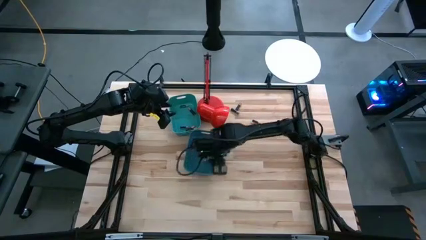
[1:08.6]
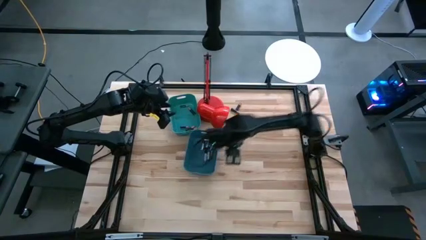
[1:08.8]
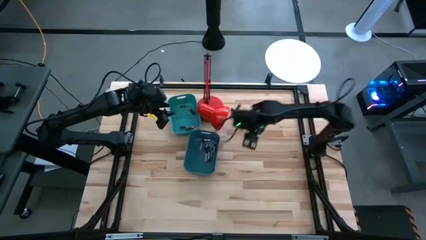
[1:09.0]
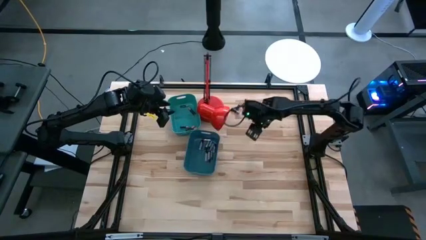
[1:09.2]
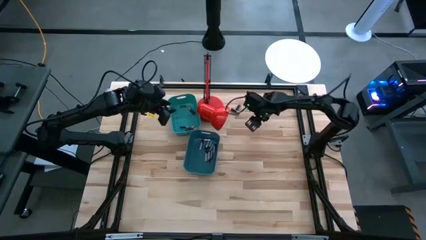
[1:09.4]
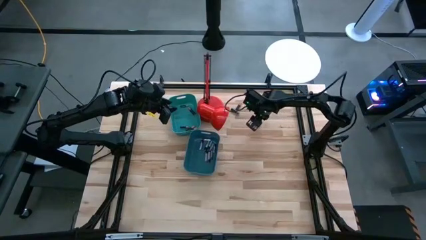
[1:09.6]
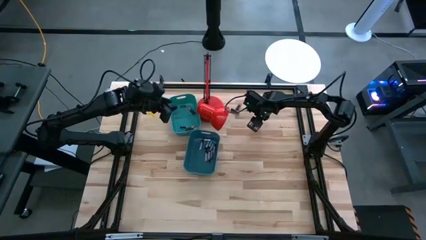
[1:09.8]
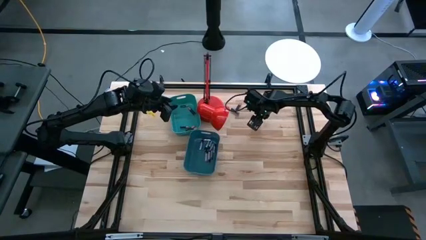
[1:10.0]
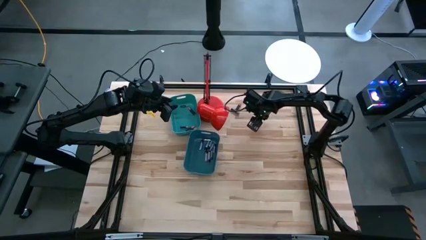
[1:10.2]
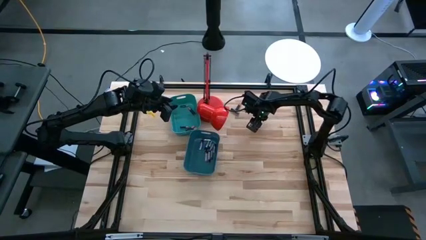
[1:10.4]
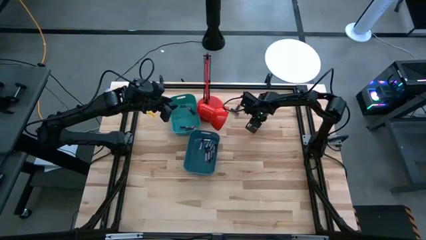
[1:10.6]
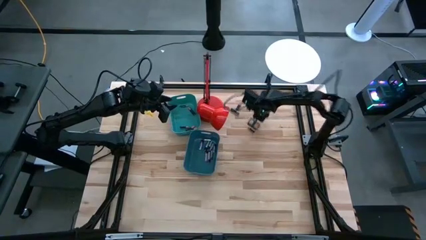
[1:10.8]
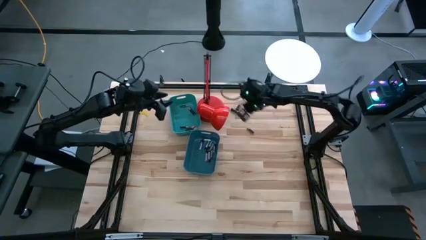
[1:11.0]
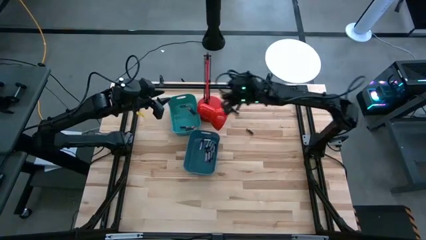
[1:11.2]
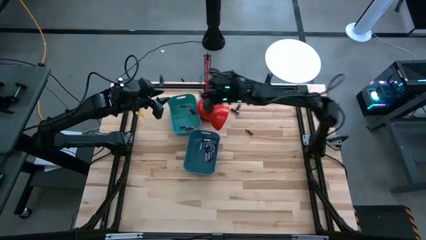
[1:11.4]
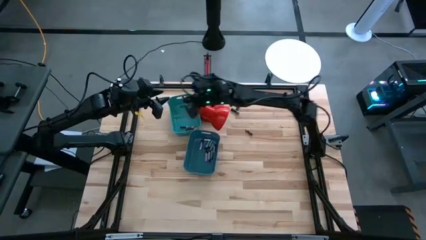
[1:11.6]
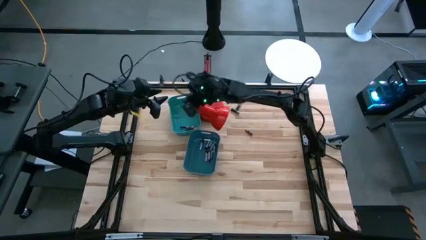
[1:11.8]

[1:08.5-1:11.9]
Task: Sort batteries
Put the brown battery into the green bin

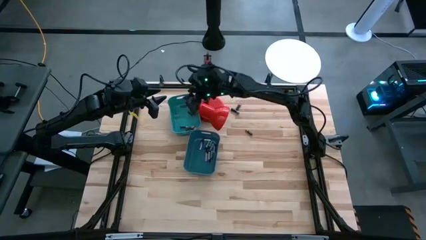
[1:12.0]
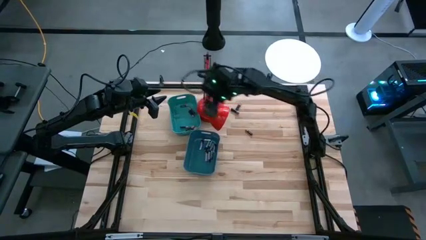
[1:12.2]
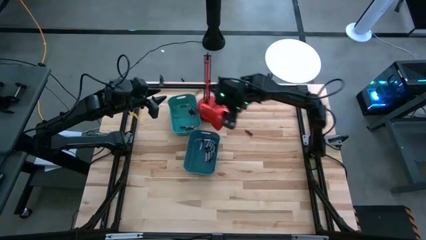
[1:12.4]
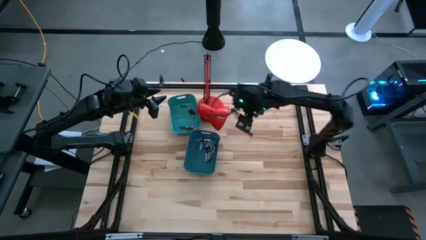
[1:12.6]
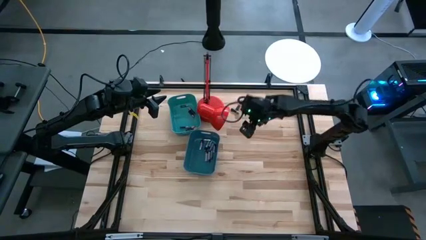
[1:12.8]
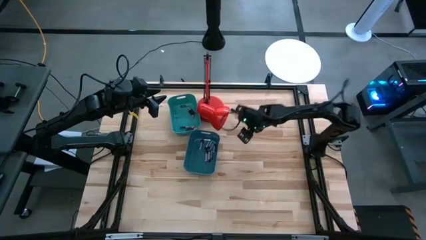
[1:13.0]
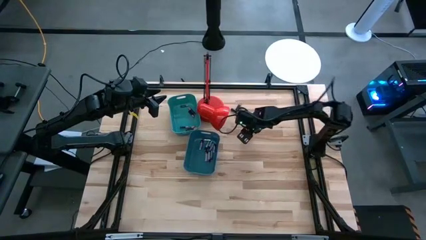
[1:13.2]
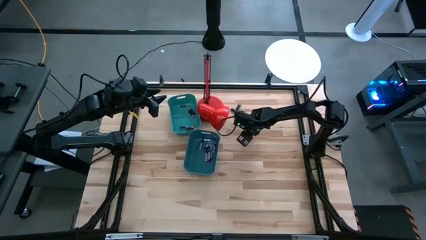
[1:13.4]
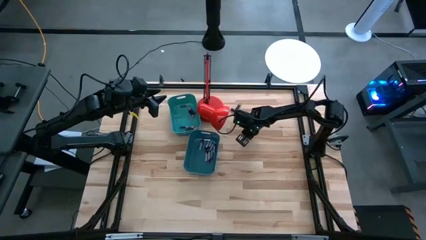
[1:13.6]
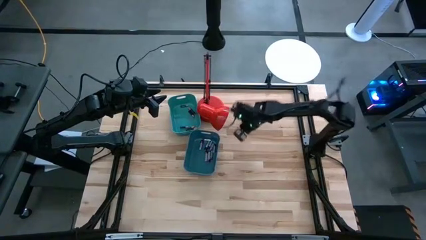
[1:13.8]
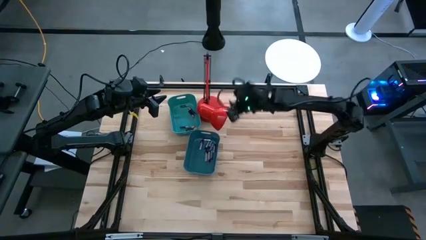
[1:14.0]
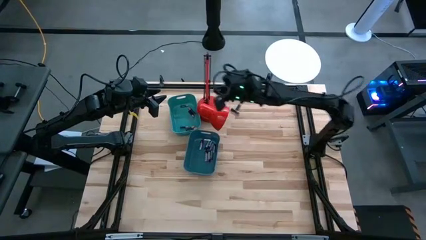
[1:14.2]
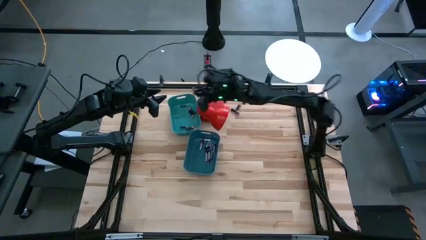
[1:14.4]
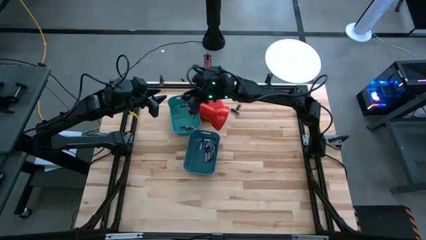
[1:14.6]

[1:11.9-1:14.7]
Put the brown battery into the green bin

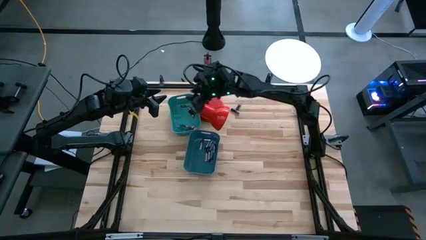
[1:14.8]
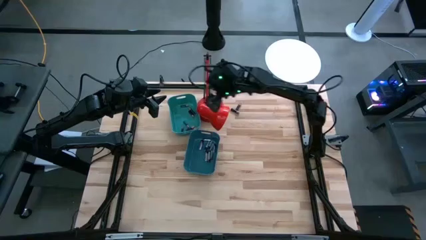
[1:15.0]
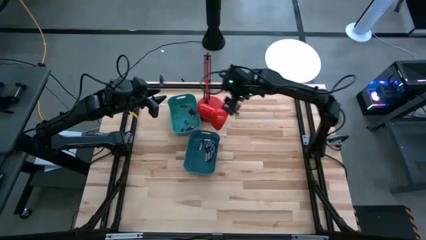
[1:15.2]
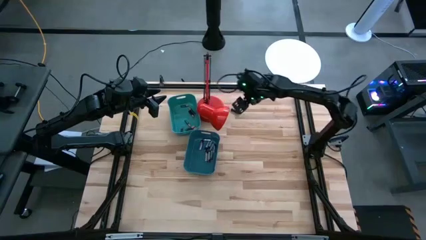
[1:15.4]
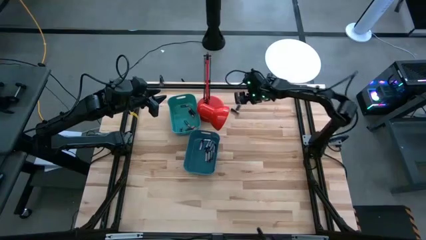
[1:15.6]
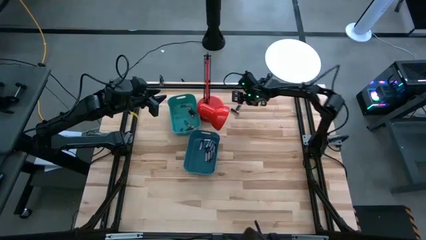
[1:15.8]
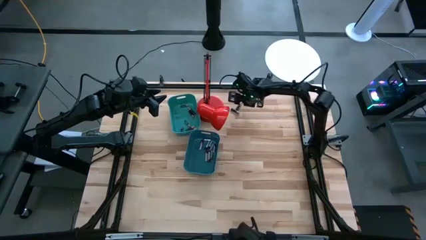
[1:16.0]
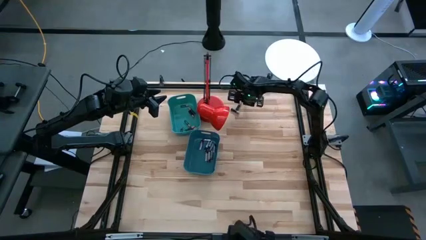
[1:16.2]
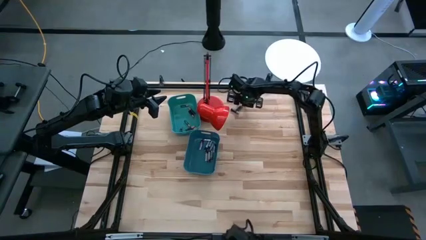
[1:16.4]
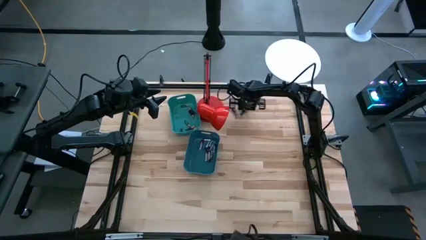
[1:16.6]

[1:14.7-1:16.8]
Put the brown battery into the green bin

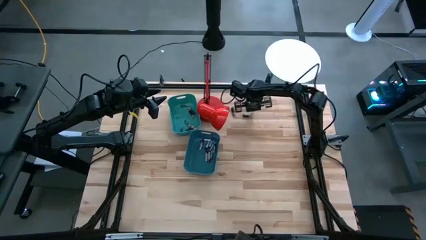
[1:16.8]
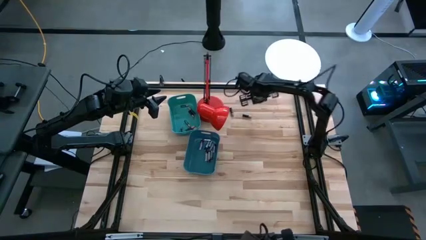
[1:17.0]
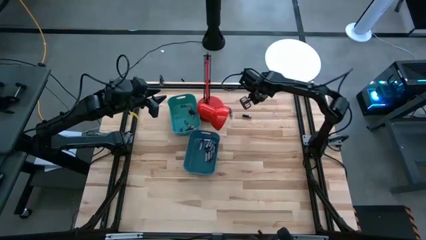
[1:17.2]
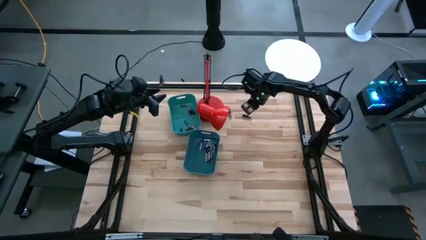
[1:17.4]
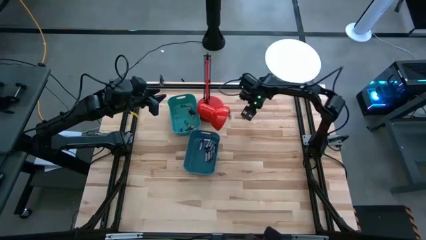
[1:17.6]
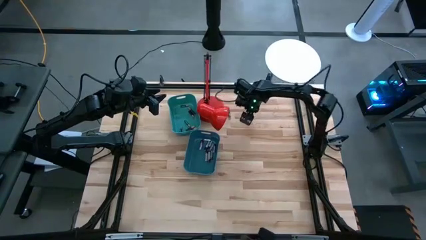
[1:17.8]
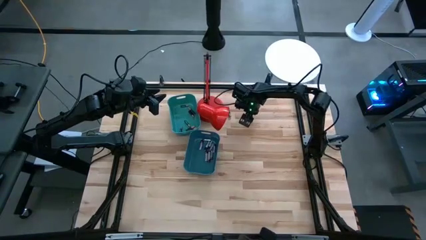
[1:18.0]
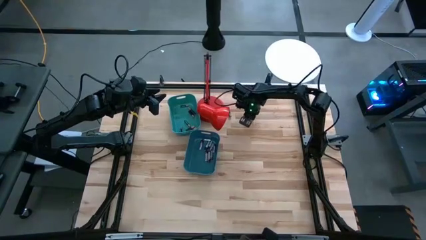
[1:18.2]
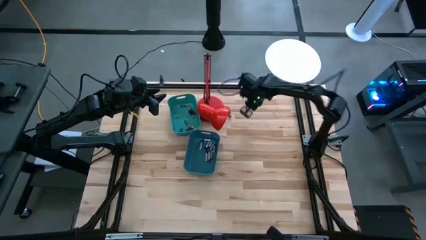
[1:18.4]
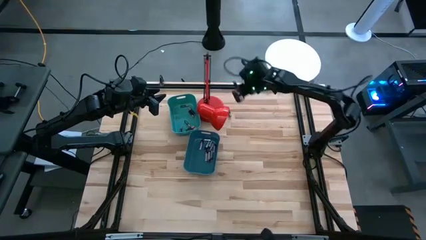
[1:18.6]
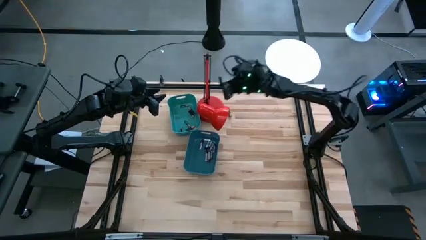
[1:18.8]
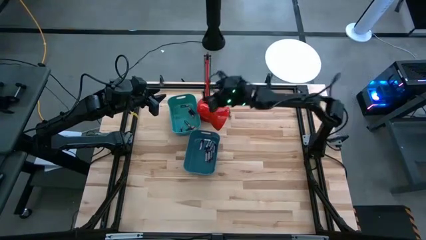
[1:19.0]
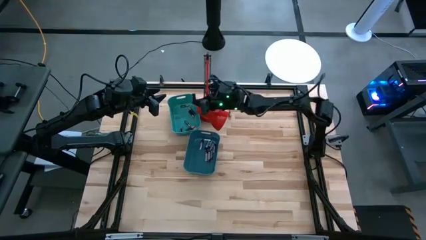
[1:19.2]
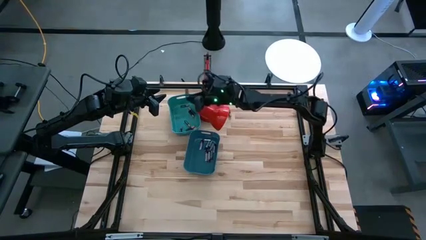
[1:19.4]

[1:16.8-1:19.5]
Put the brown battery into the green bin

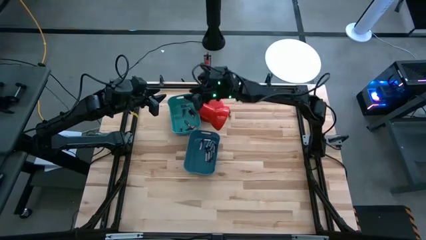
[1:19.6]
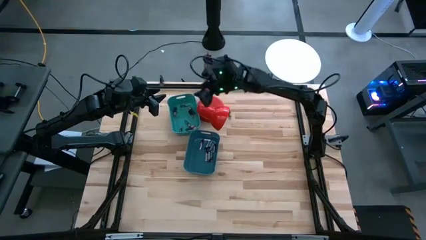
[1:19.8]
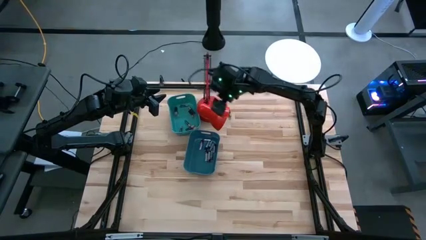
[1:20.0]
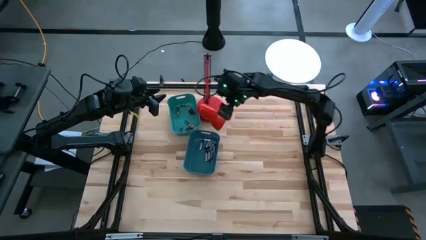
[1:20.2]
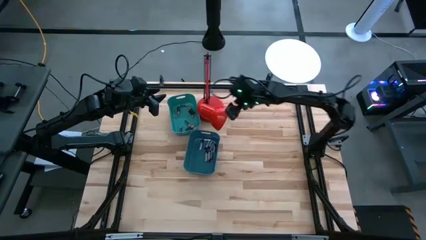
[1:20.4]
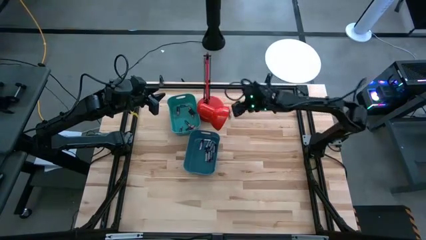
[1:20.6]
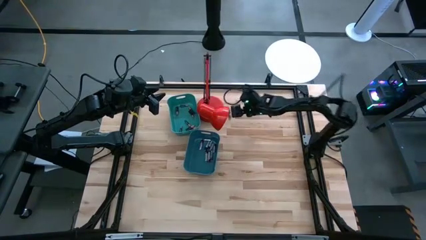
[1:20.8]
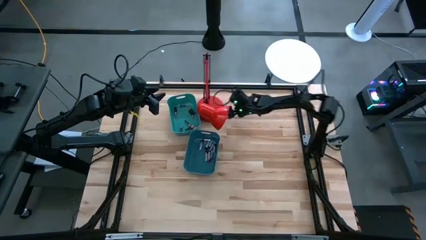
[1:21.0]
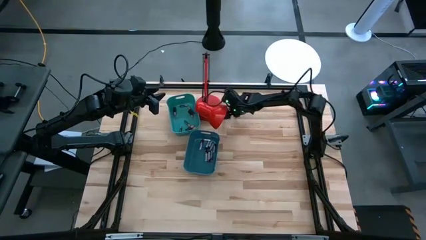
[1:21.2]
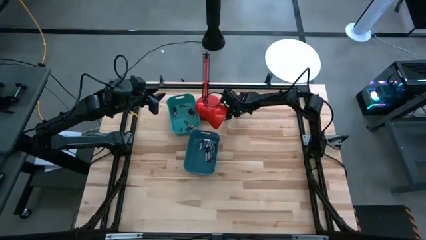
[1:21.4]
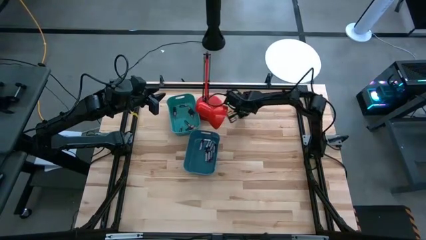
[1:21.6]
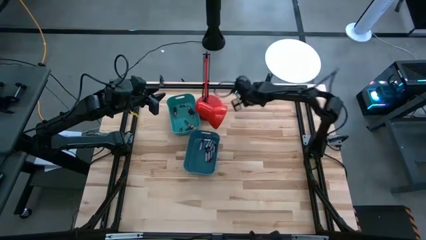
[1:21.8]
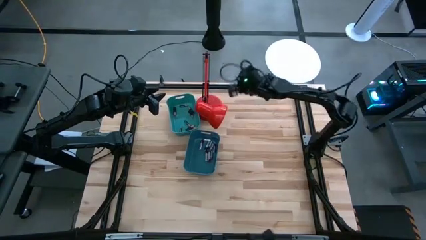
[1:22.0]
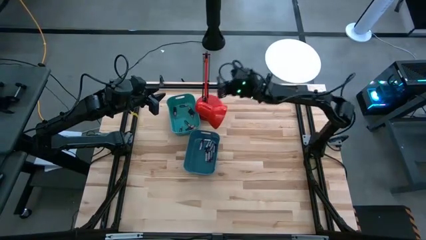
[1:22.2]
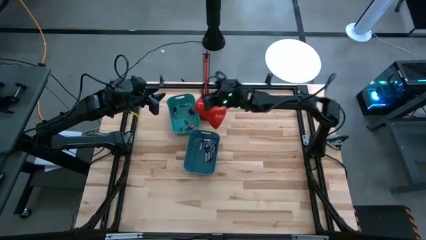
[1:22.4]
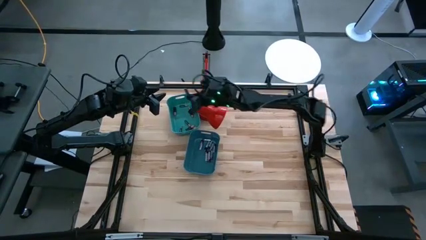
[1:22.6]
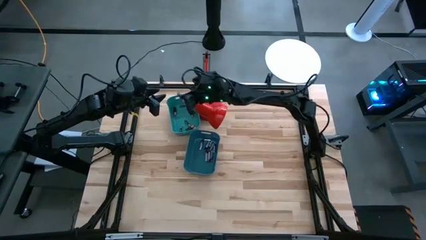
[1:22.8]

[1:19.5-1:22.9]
Put the brown battery into the green bin

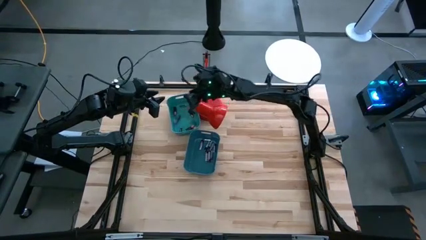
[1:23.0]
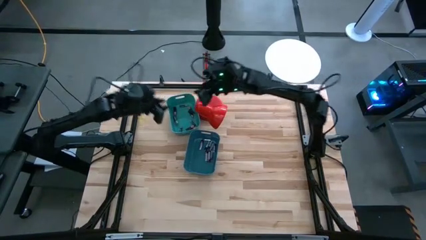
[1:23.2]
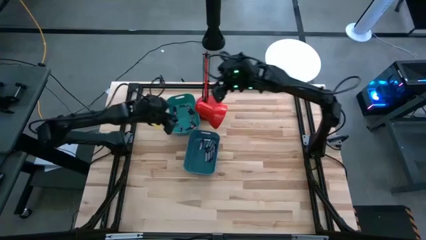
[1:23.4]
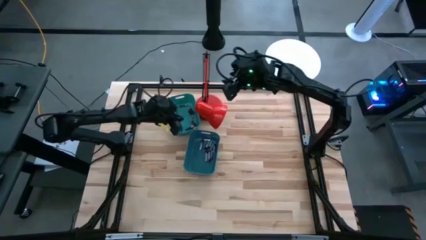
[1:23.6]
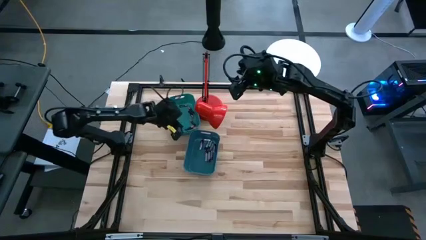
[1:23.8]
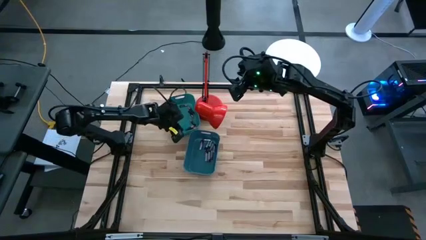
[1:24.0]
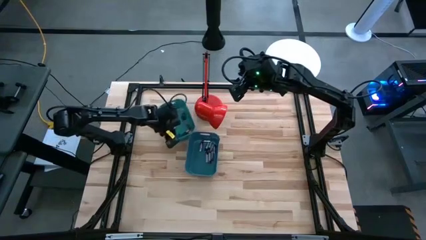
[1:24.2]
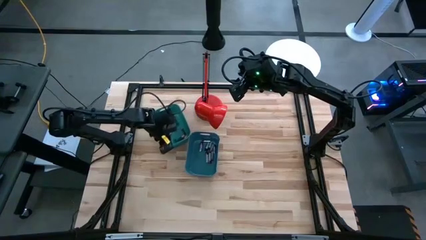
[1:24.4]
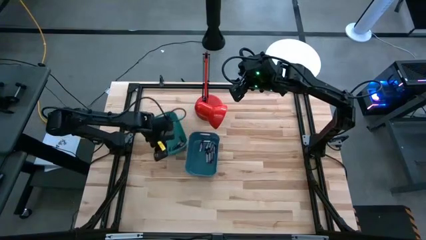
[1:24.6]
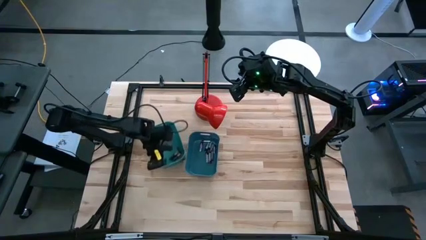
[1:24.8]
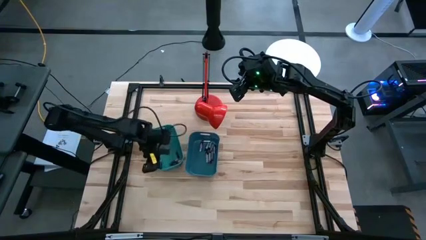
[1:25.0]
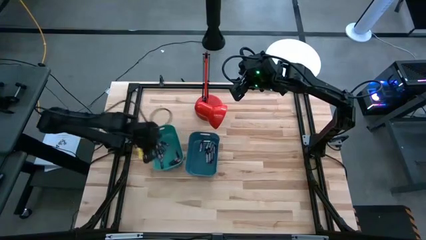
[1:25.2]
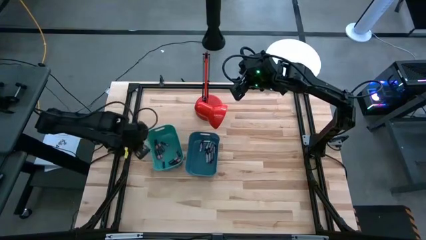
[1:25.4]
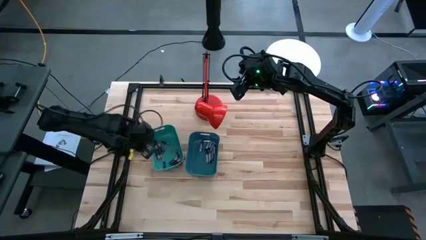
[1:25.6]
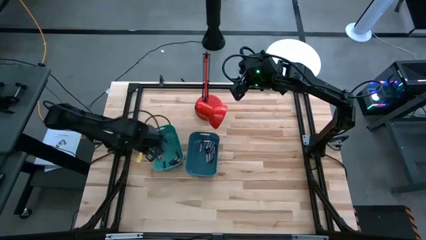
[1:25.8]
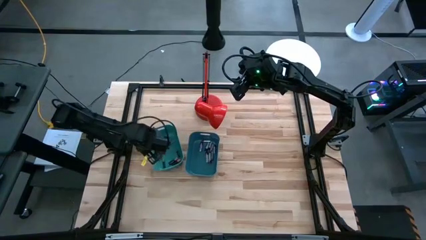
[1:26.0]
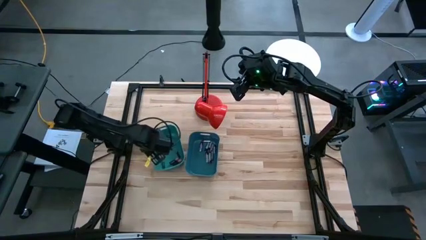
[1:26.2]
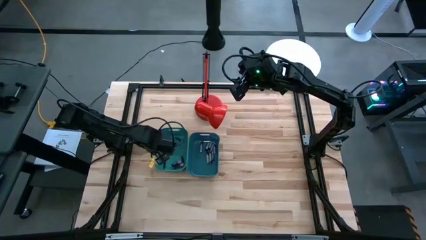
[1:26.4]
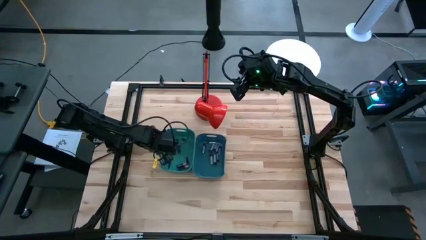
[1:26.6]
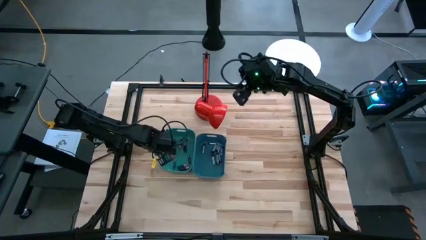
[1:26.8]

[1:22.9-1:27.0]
Move the green bin to the left side of the blue bin
